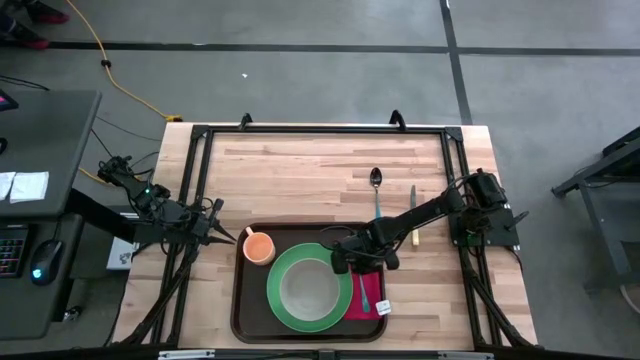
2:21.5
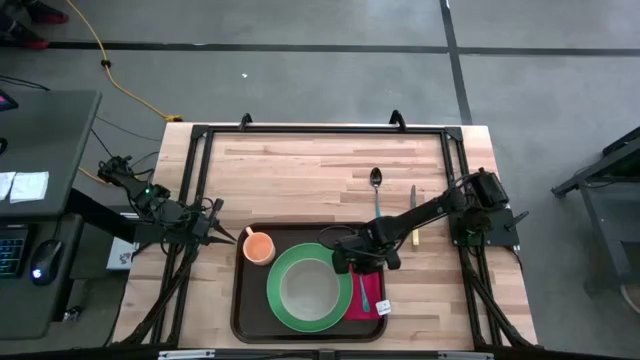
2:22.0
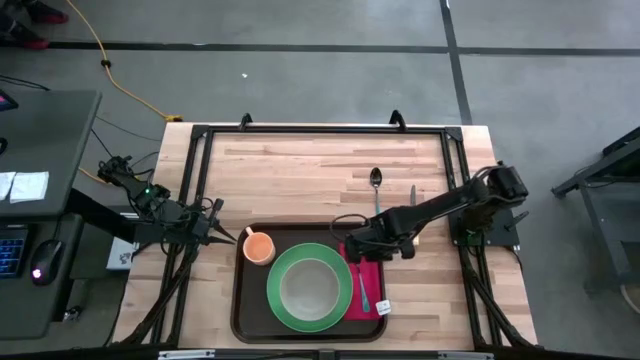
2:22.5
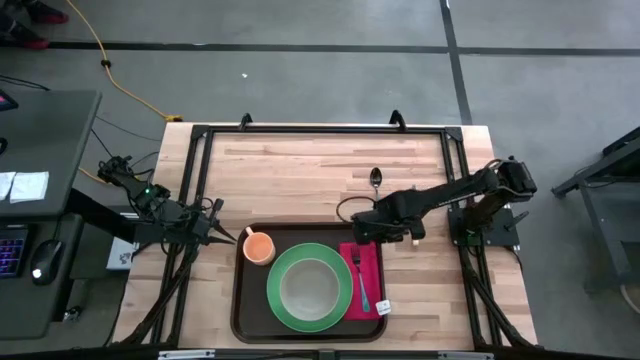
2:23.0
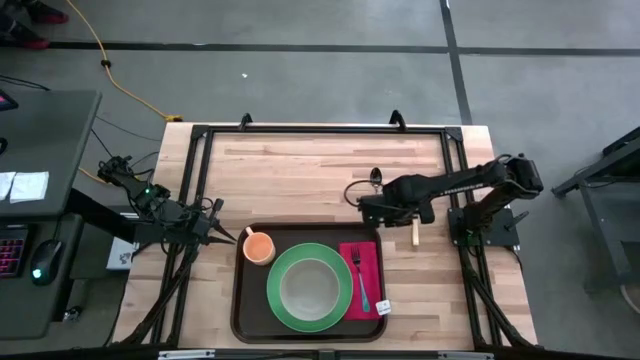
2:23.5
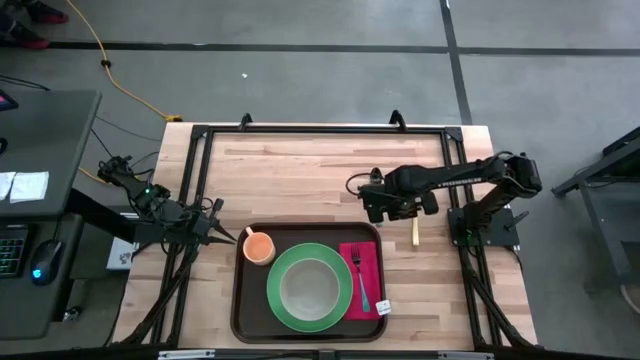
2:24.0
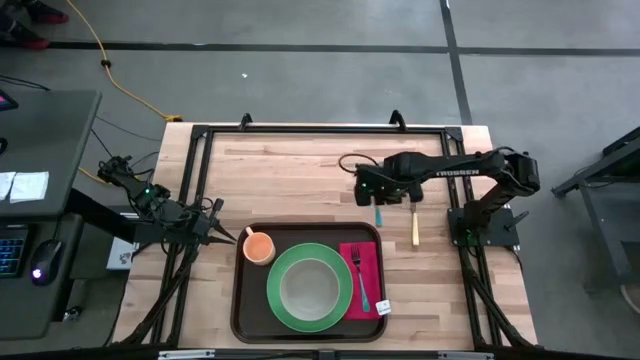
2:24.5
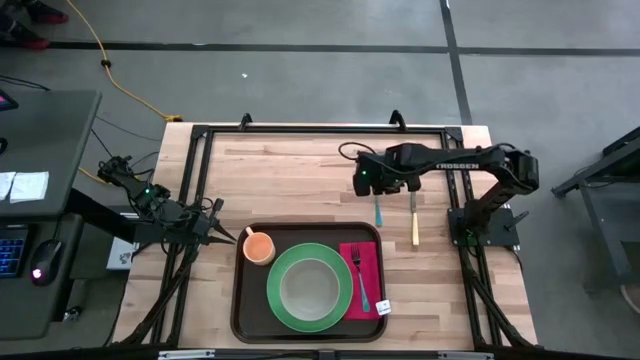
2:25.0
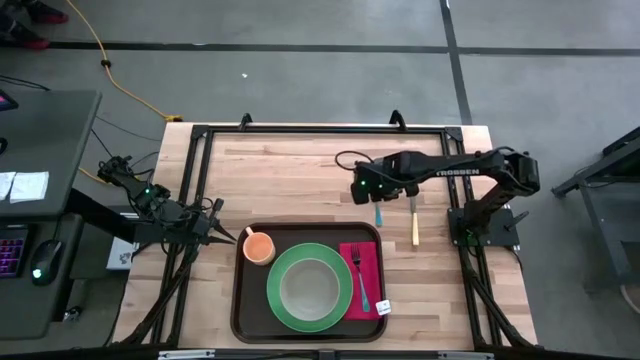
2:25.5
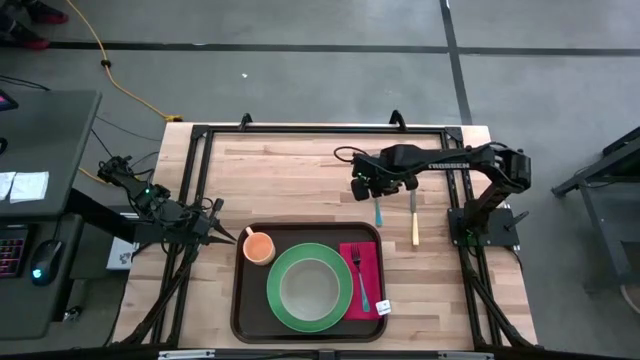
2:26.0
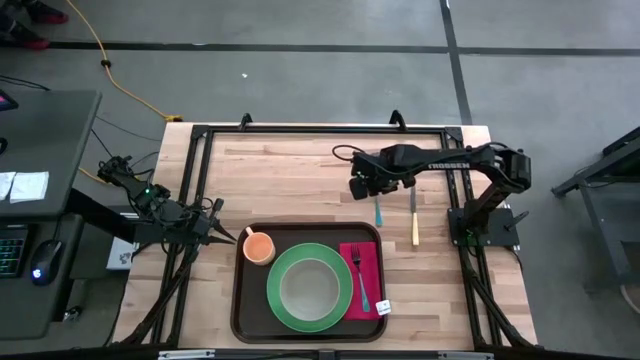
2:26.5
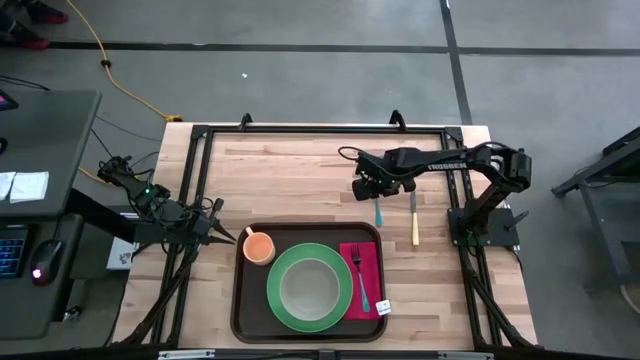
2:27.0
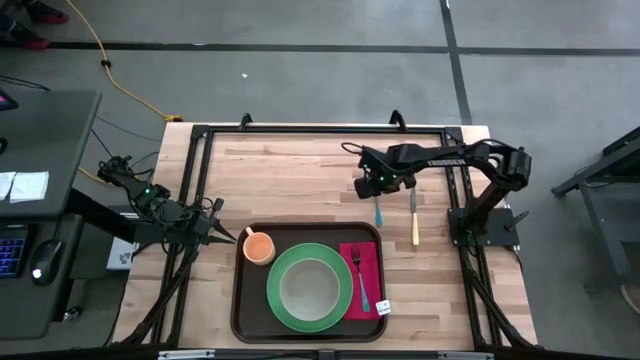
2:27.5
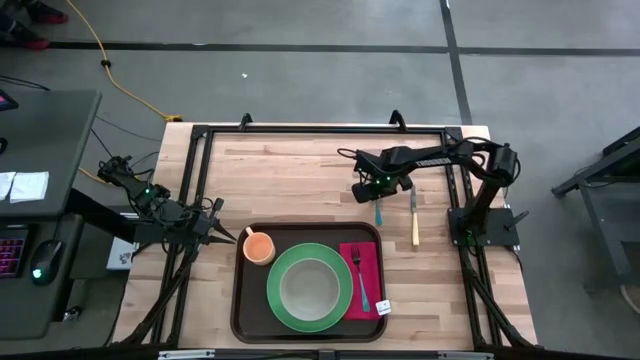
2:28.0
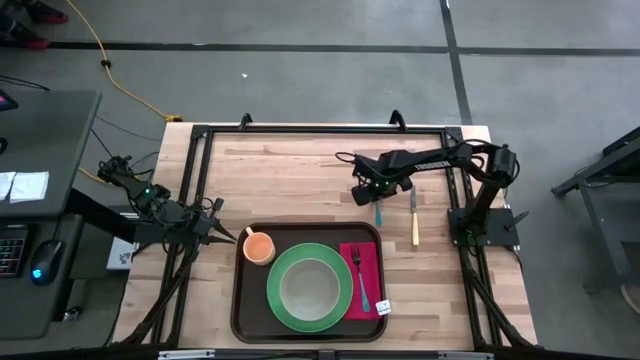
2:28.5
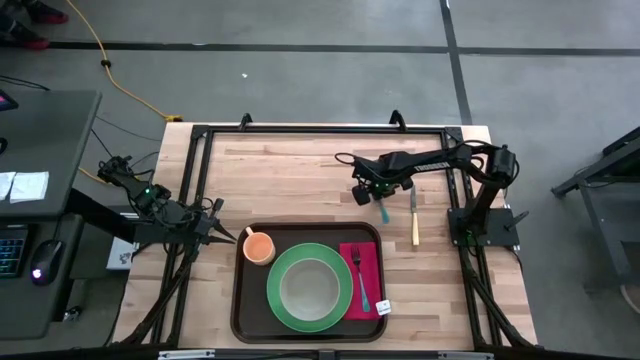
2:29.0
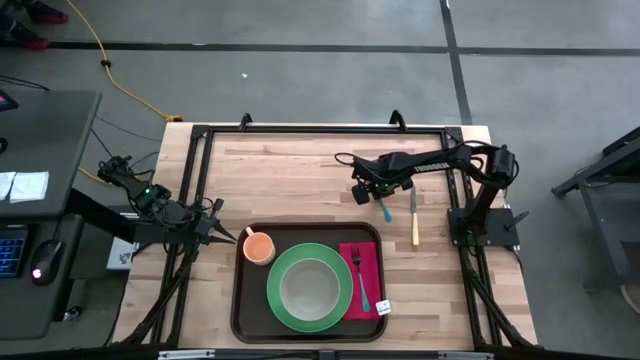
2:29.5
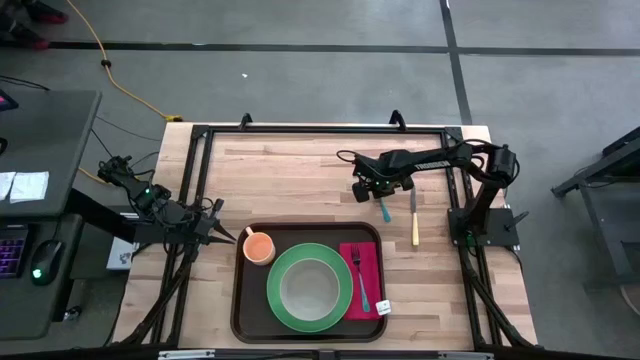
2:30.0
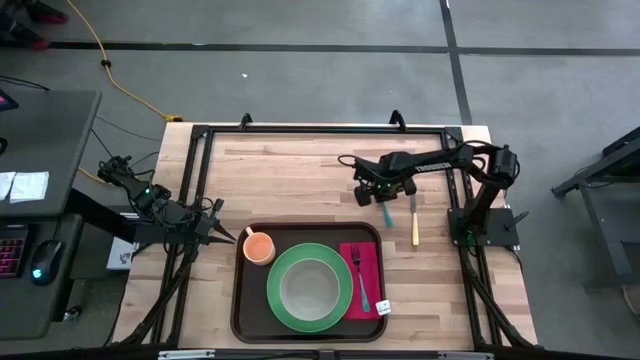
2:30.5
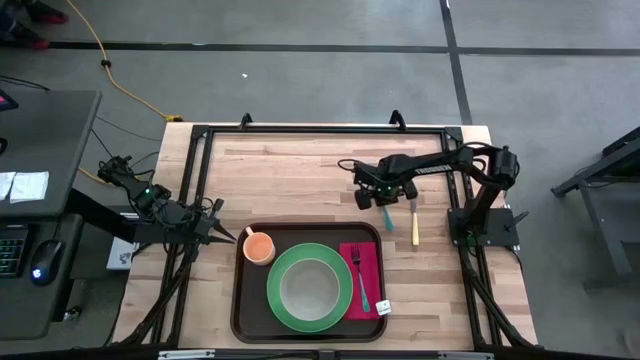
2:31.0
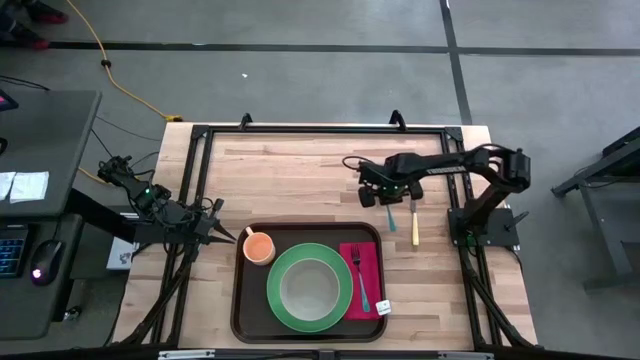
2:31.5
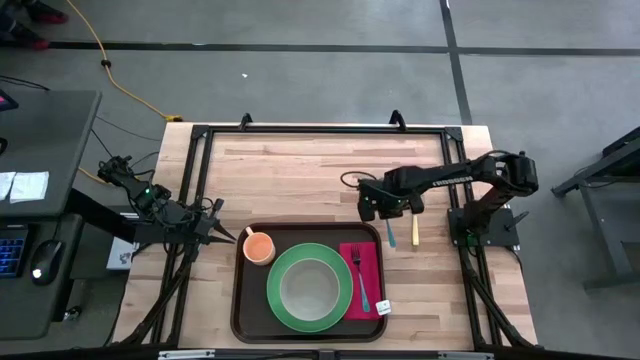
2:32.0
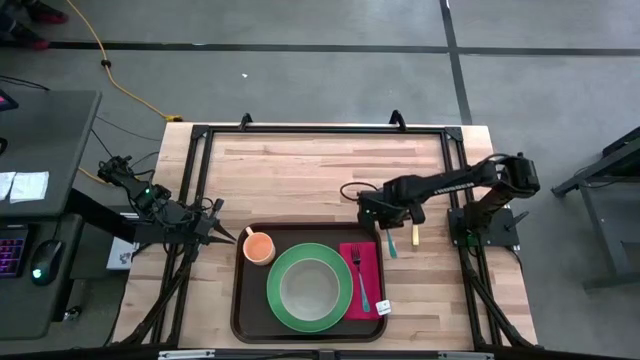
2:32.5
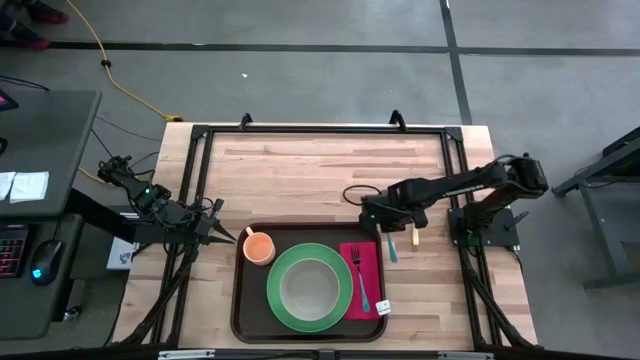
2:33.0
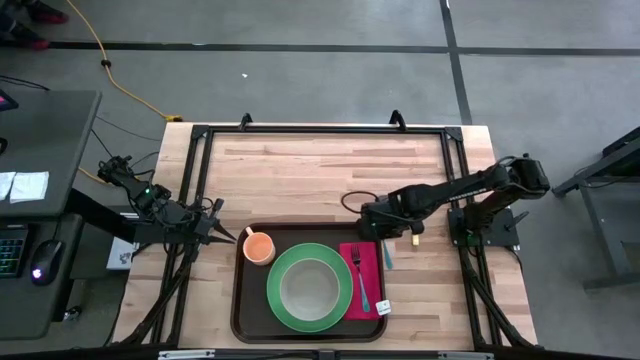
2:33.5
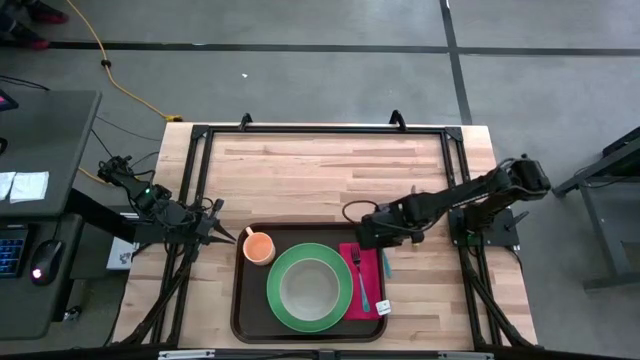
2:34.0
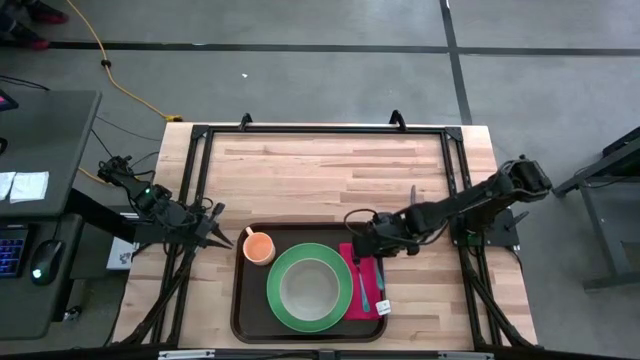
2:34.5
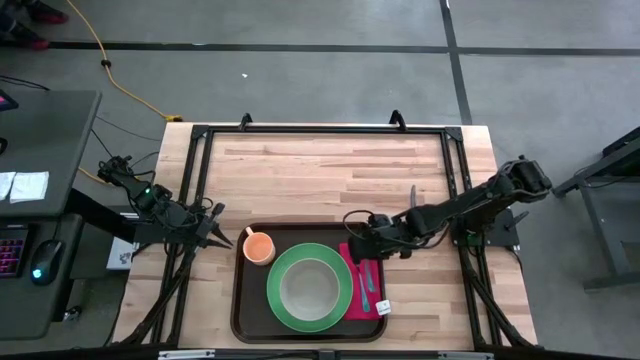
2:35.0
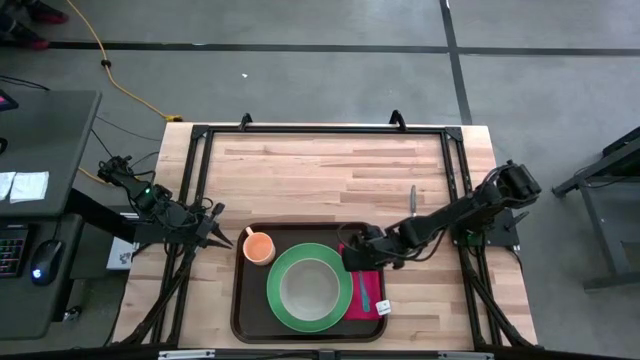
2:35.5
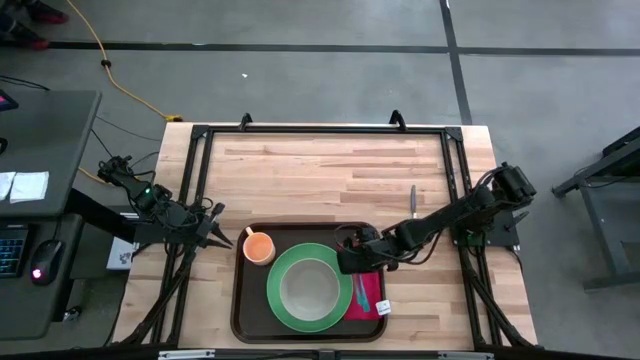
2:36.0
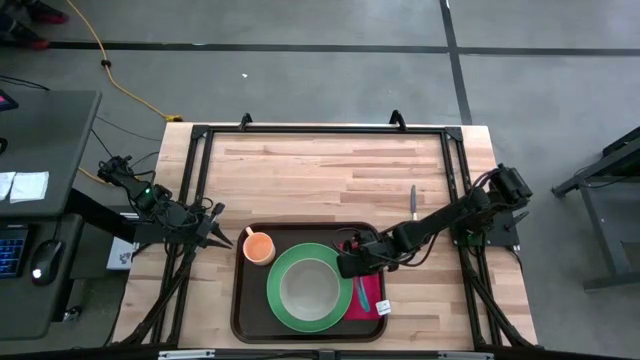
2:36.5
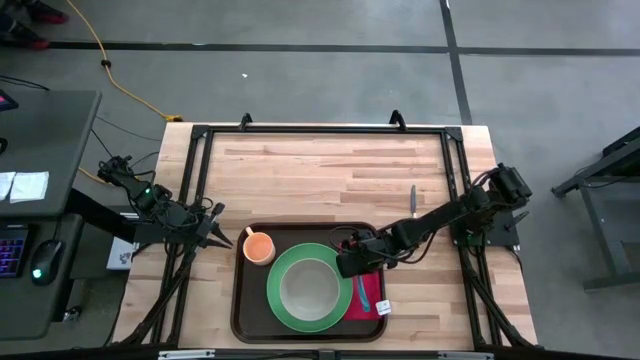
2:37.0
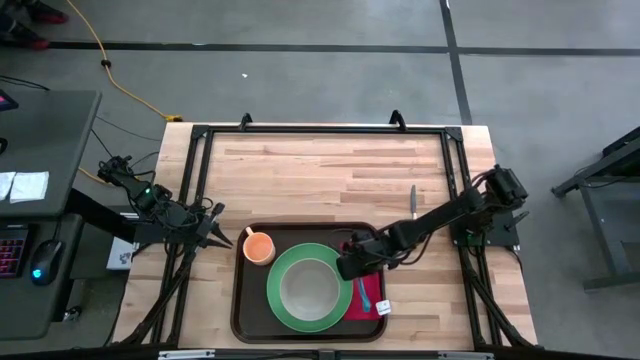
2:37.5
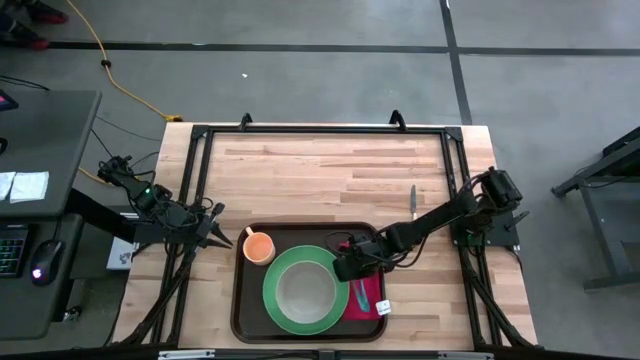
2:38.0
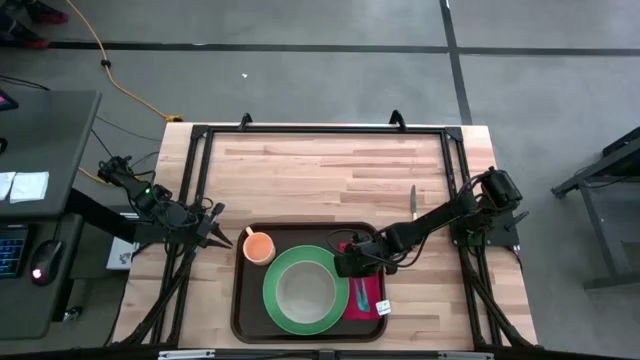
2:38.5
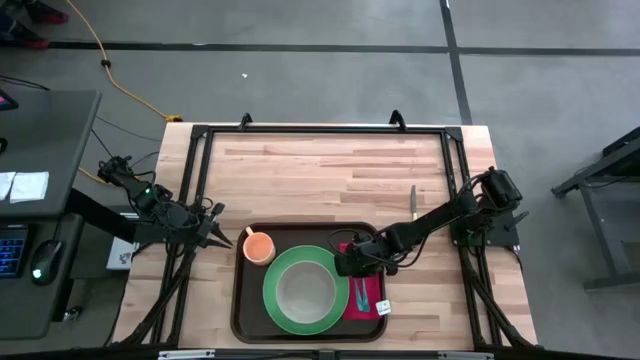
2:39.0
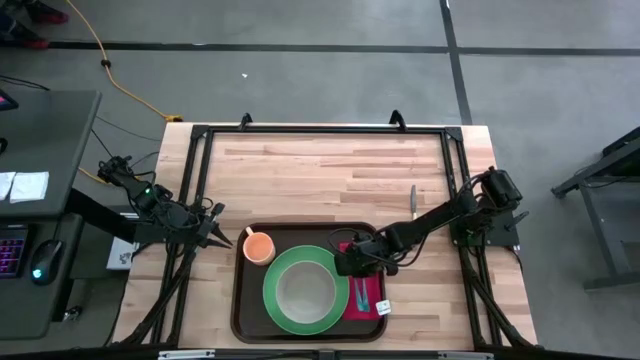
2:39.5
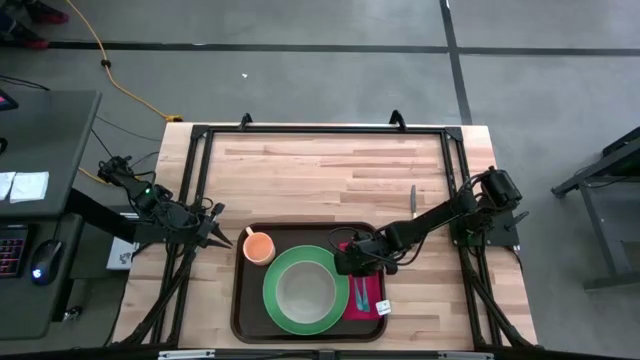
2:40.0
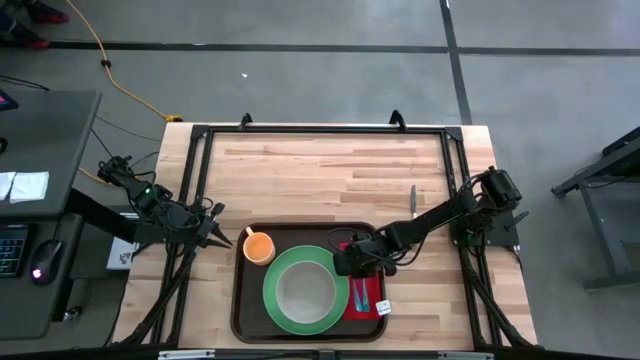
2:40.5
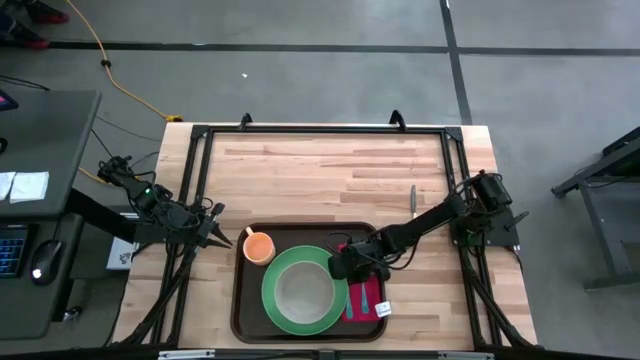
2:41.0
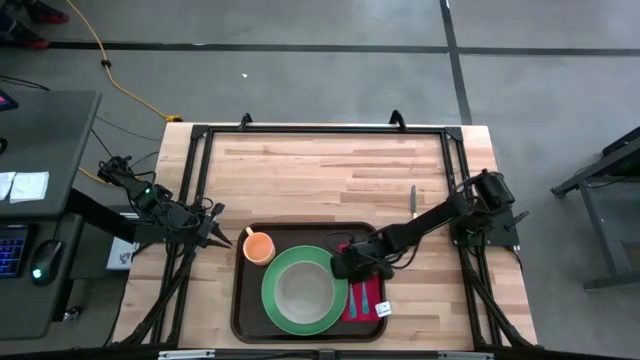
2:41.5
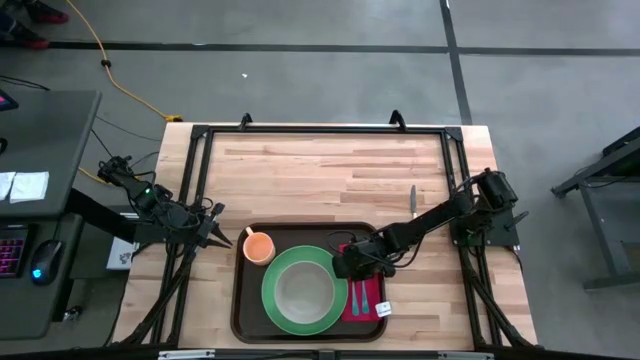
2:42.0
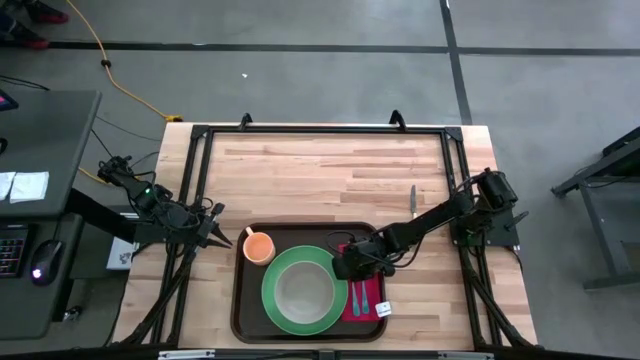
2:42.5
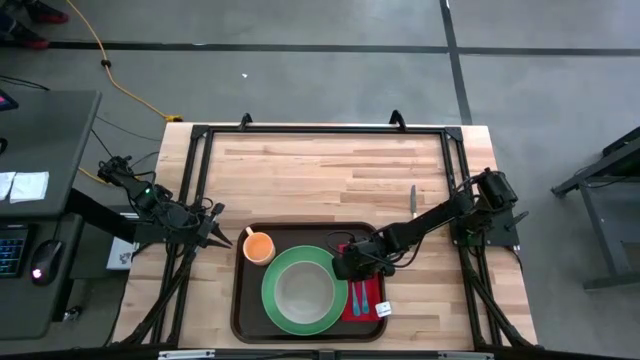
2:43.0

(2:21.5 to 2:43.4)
Task: Set up tray
Put the spoon on the top of the table napkin between the green and blue fork on the brown serving tray
